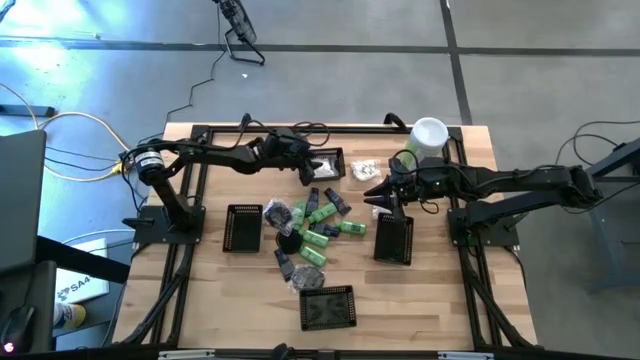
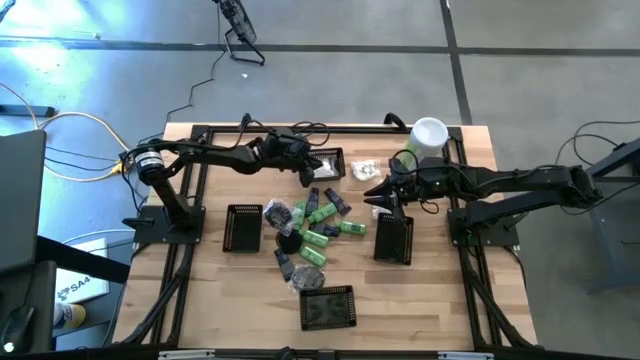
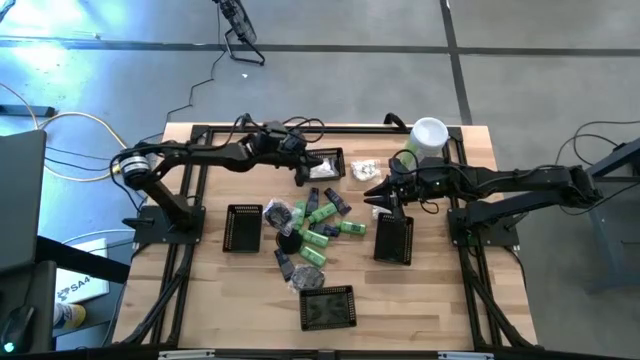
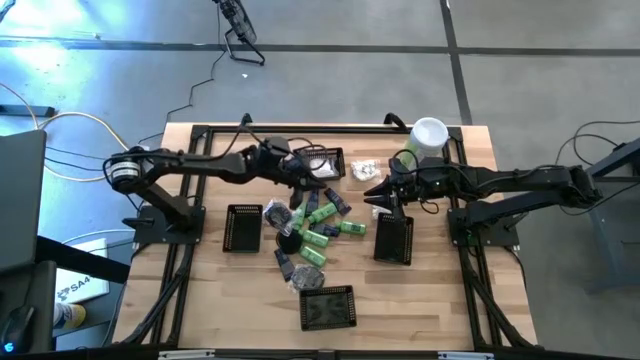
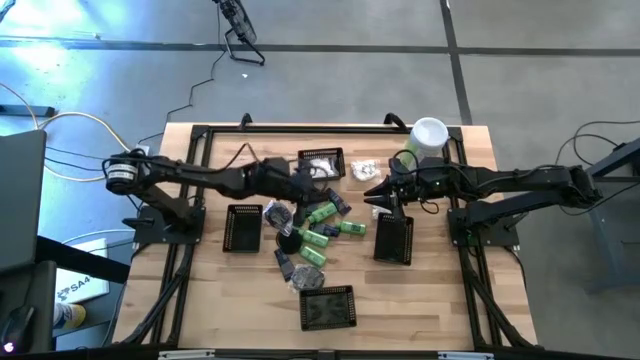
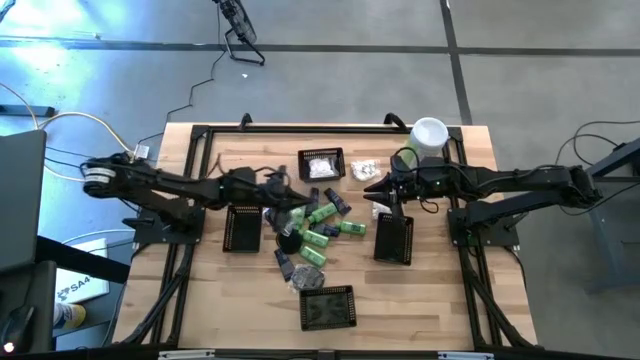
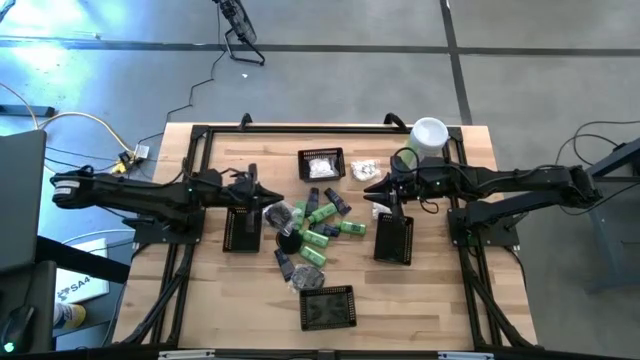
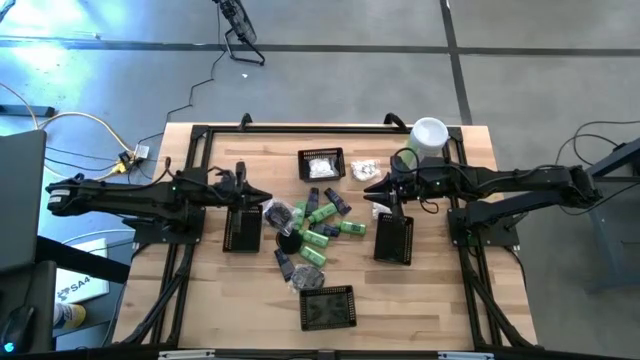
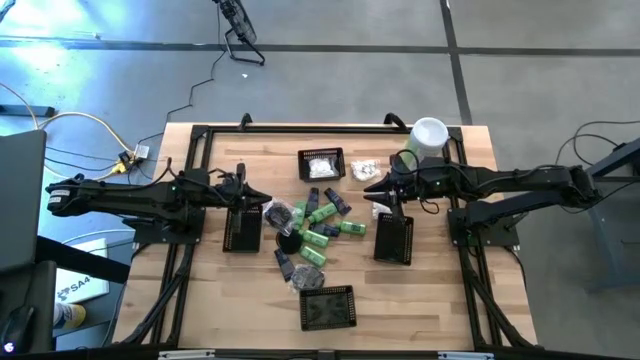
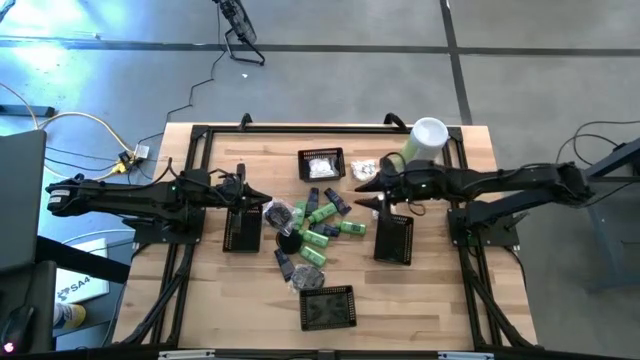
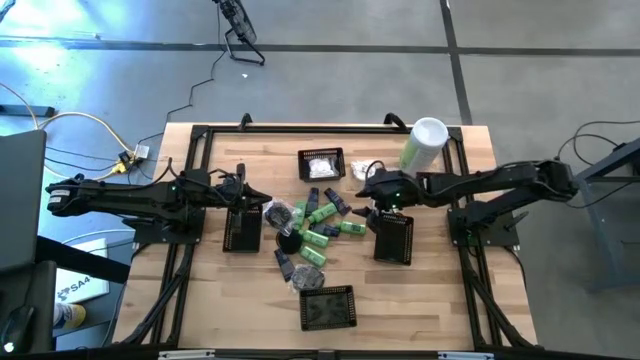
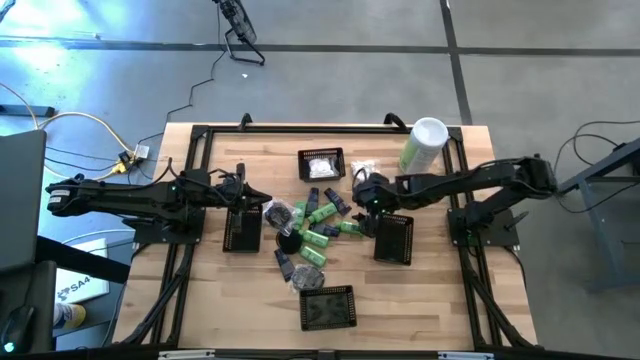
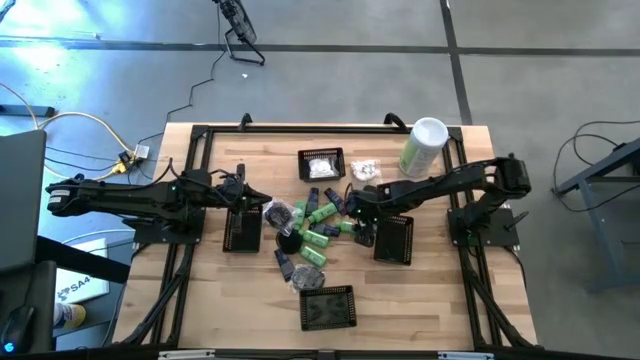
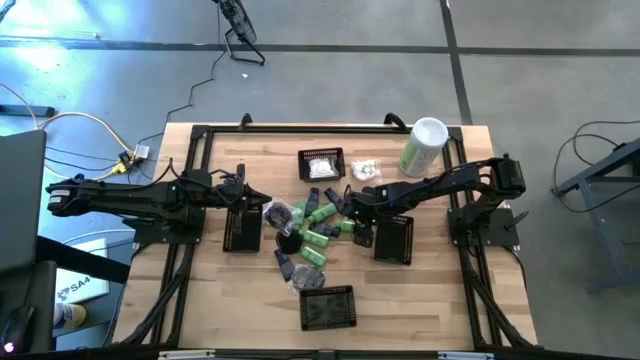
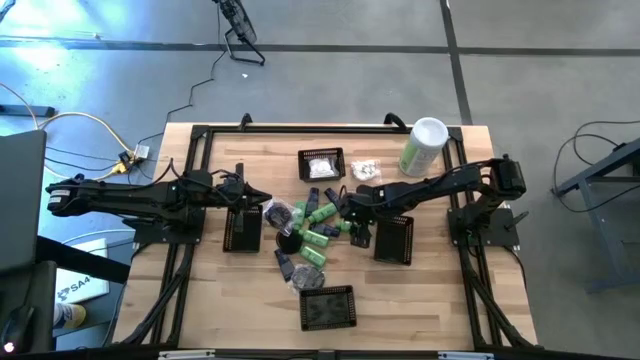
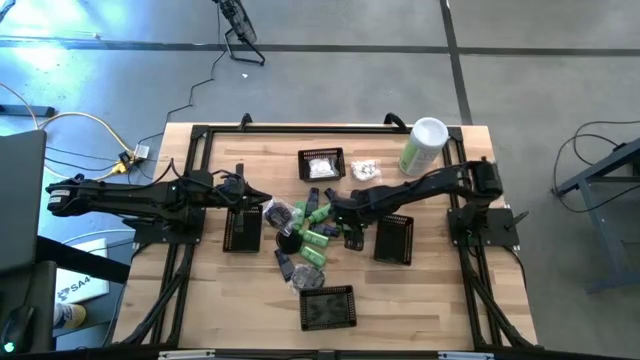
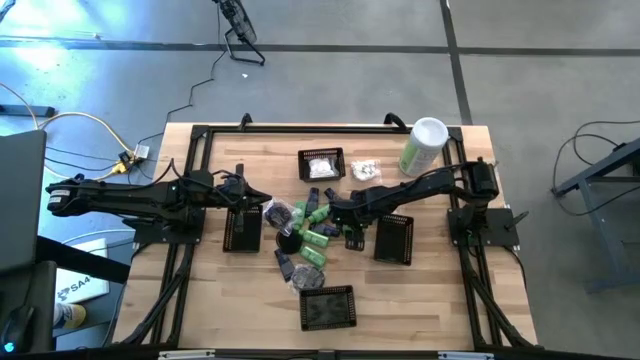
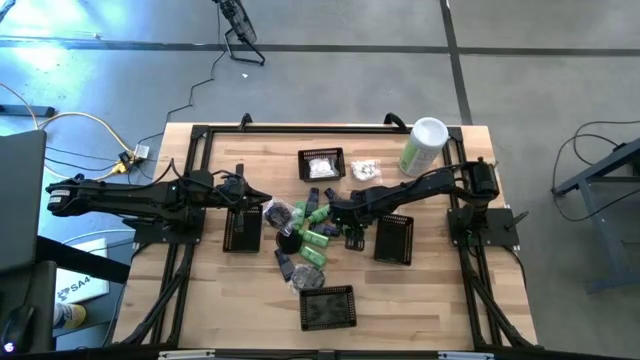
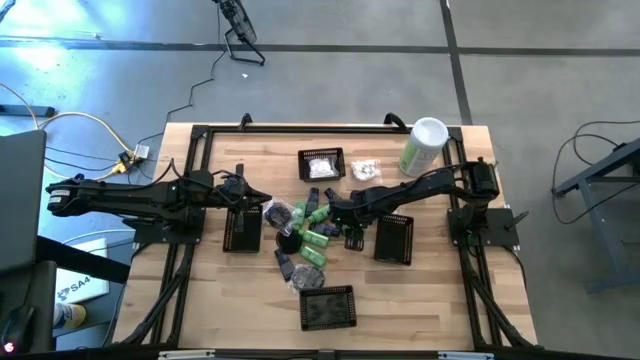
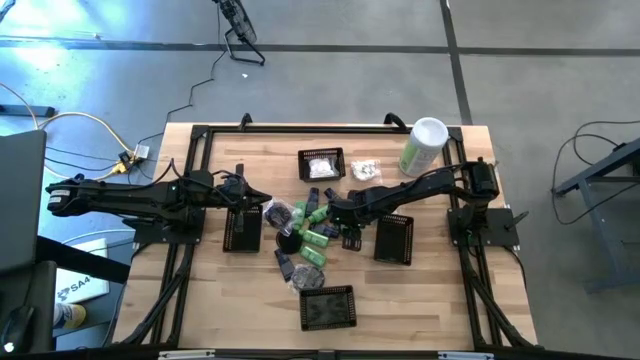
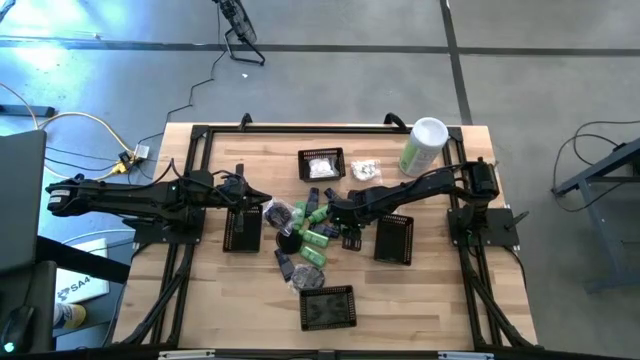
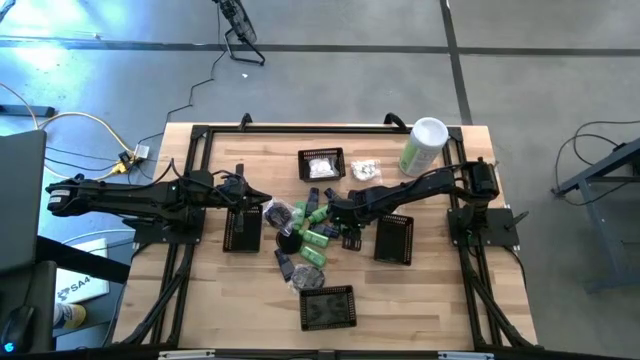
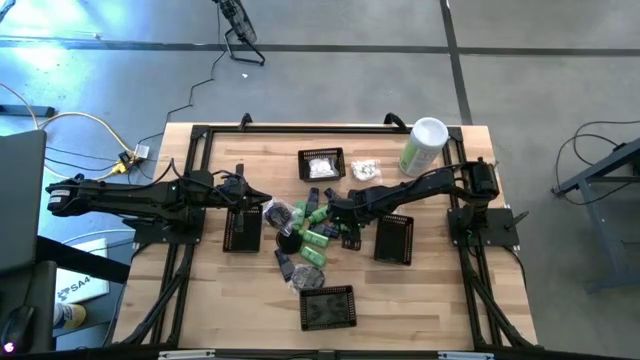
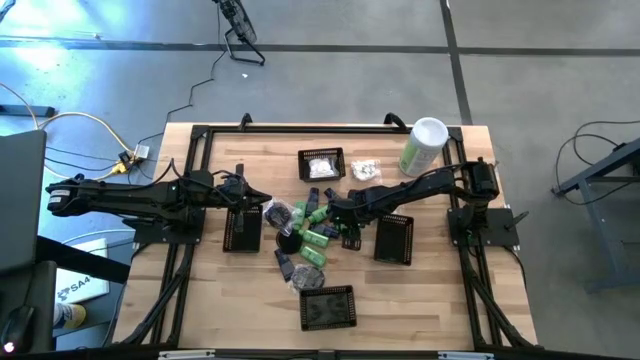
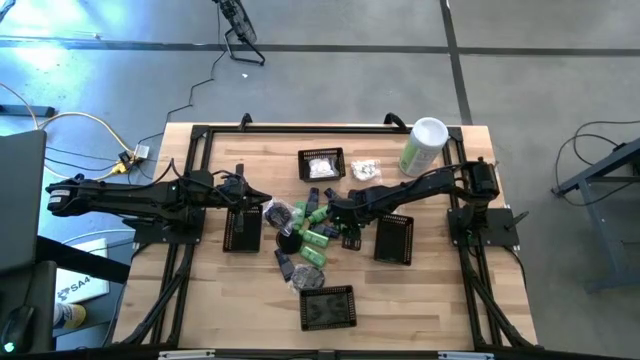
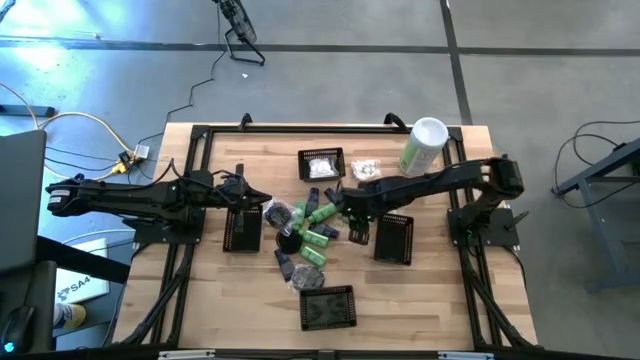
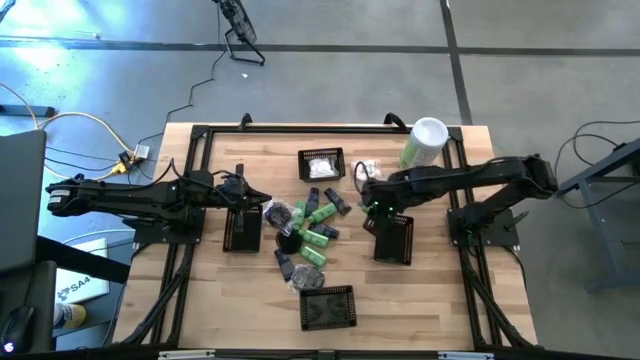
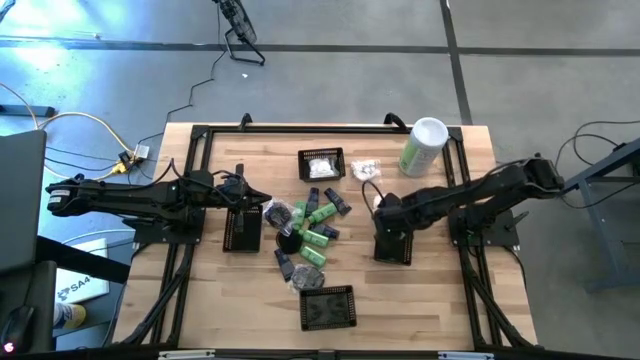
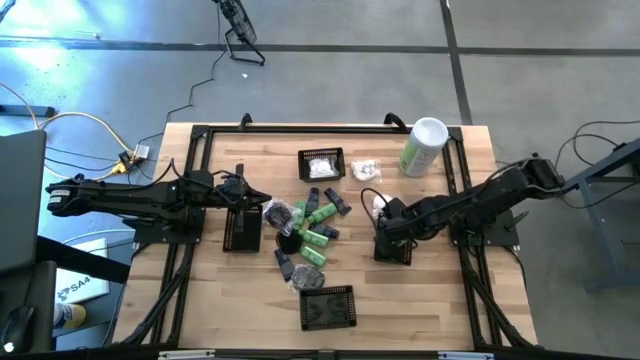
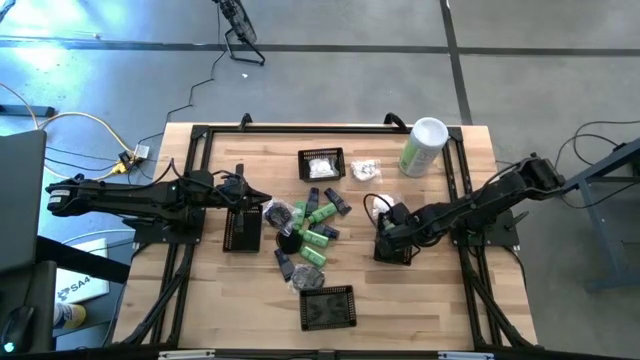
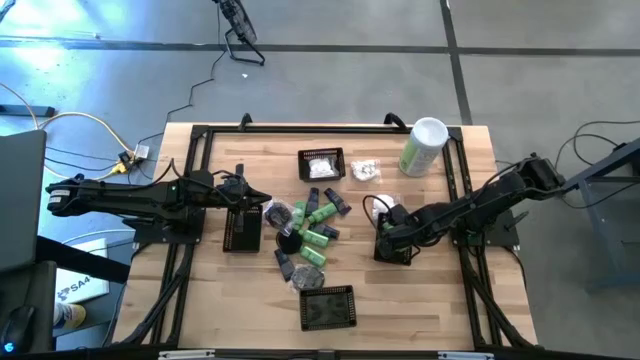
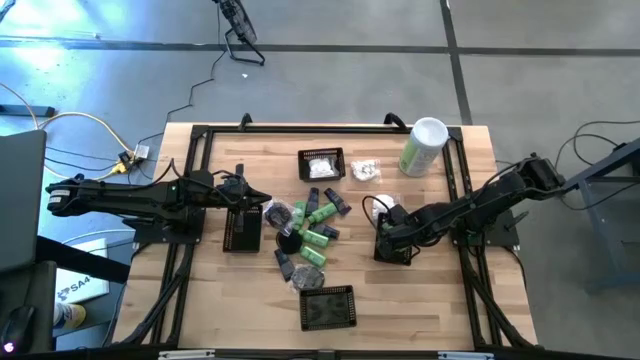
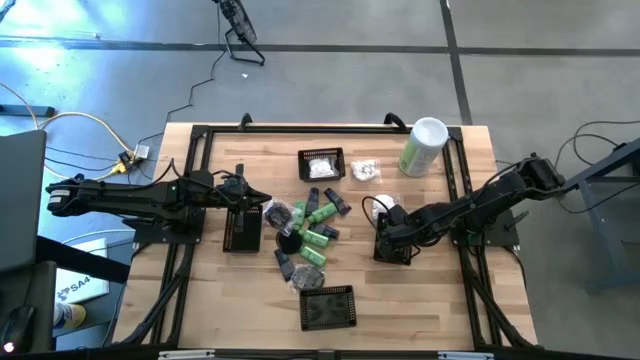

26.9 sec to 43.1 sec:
Task: Pick & Place Travel size toiletries
Put the green bottle into the middle right black bin

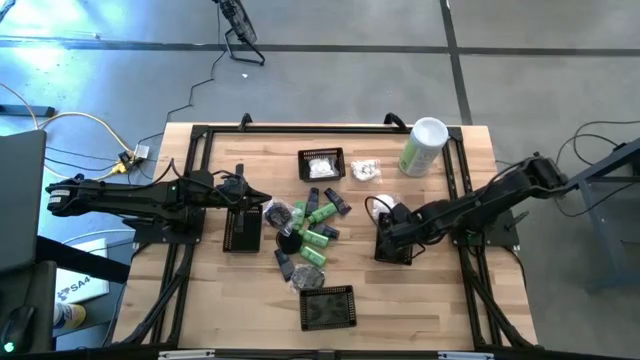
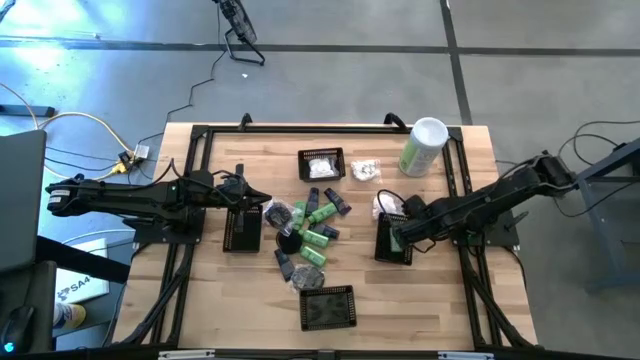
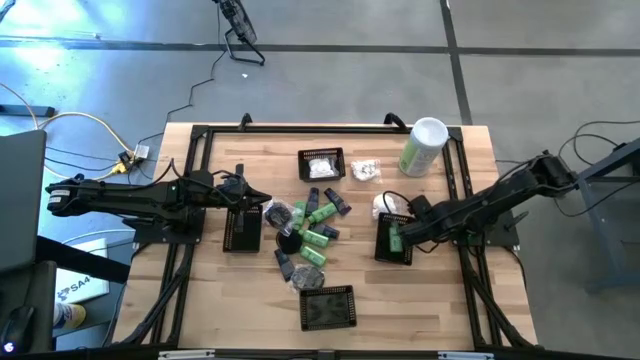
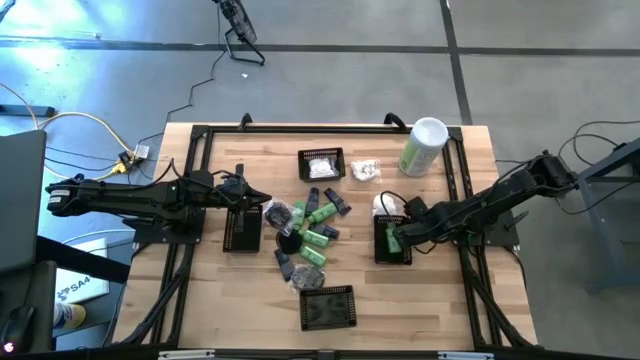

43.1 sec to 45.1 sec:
Adjust the middle right black bin on the table
